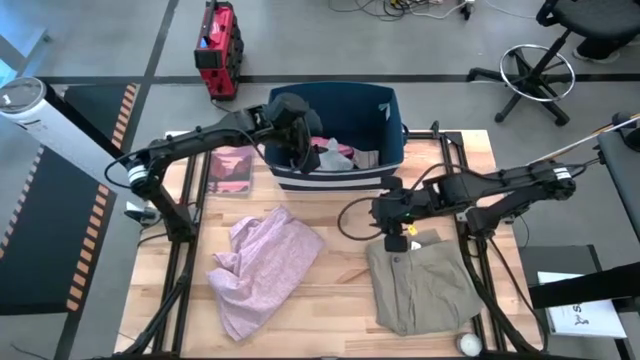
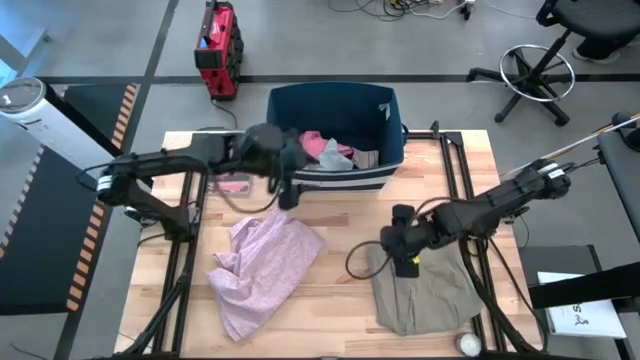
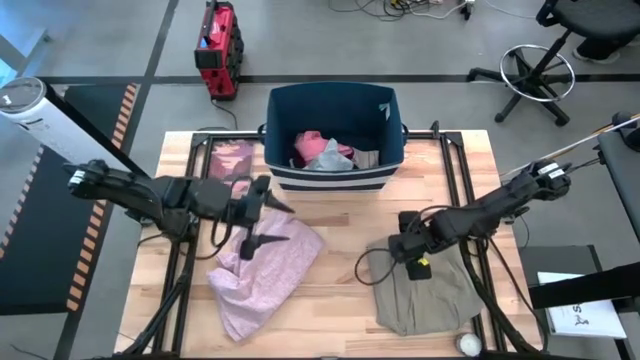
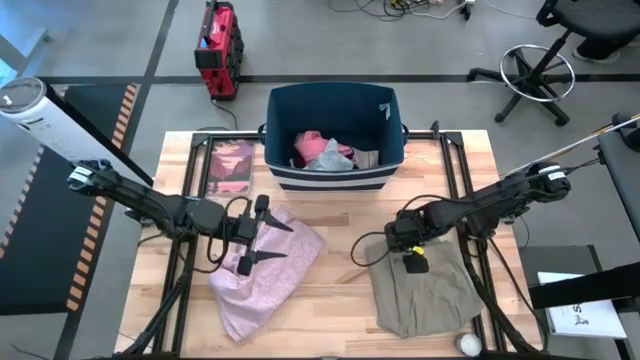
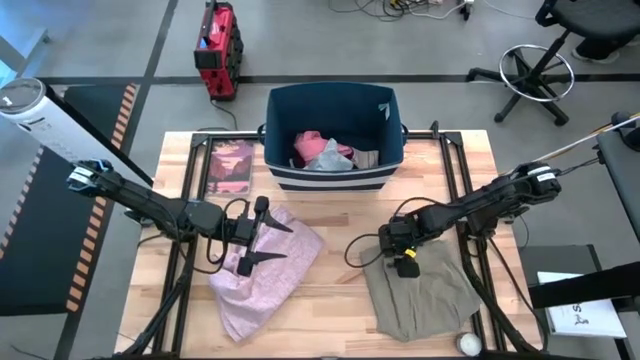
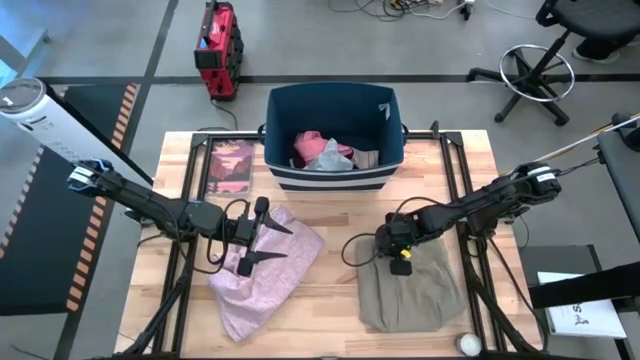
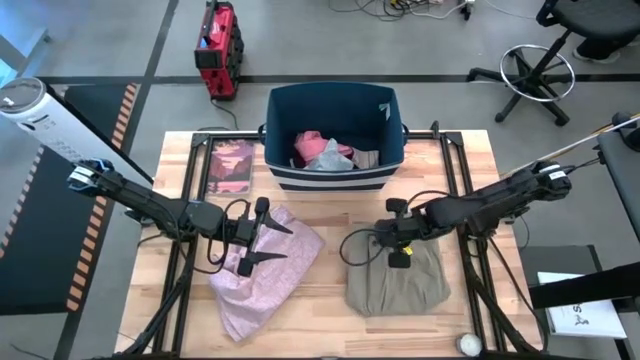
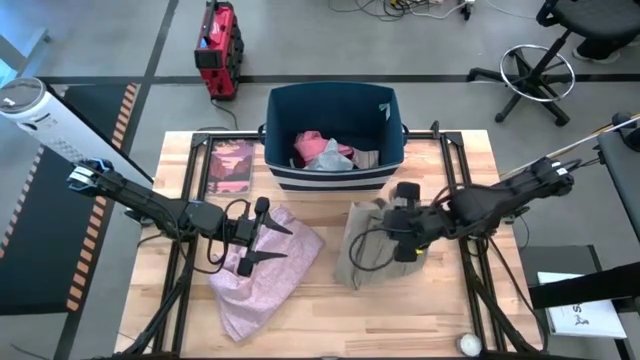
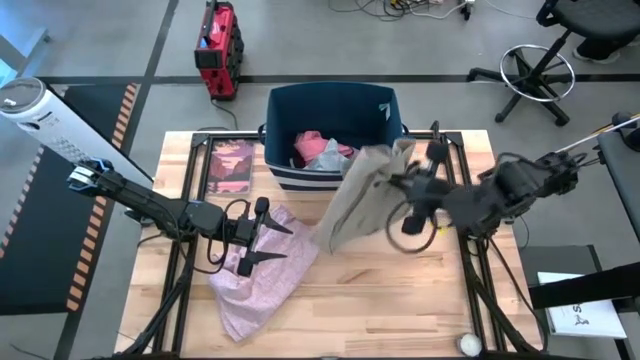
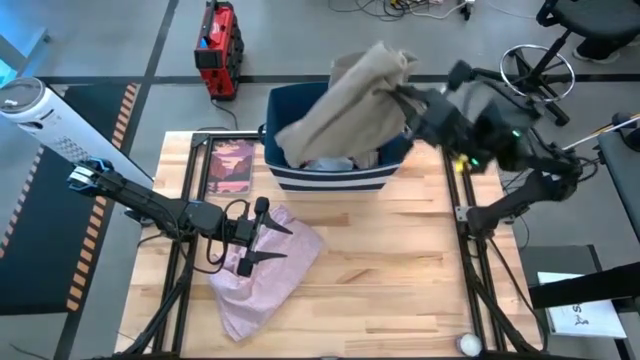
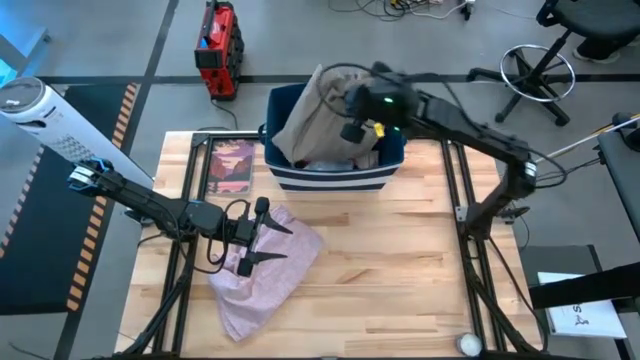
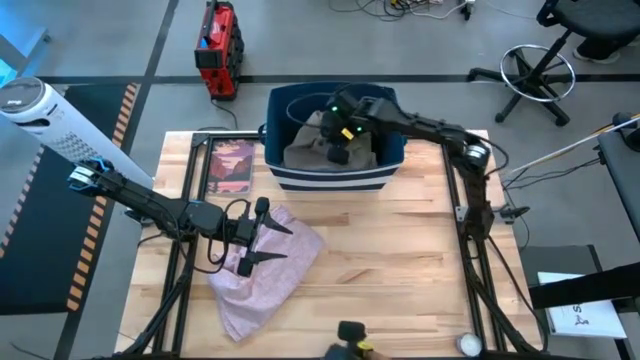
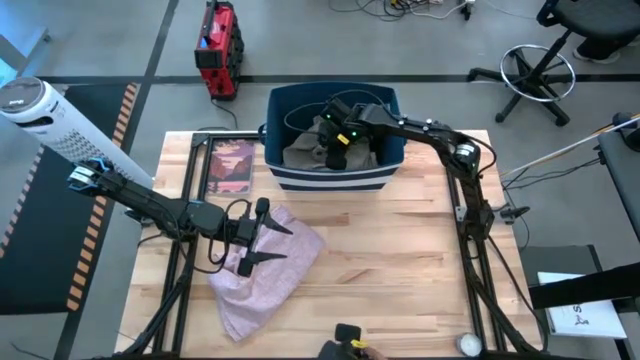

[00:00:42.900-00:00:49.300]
Task: Sort clothes
Put the brown short pants into the blue laundry bin

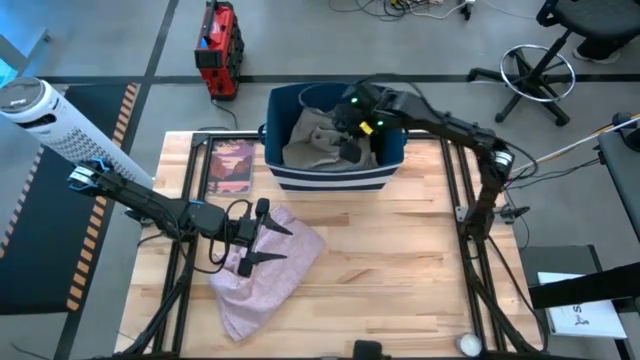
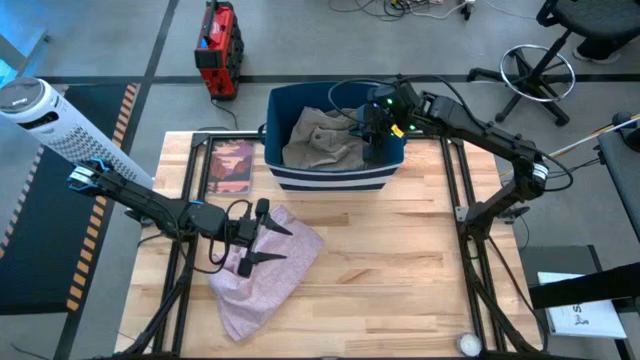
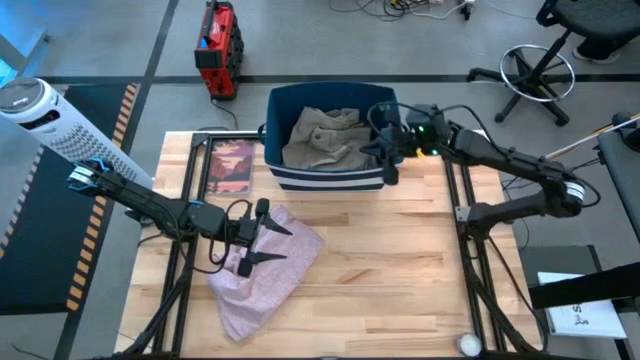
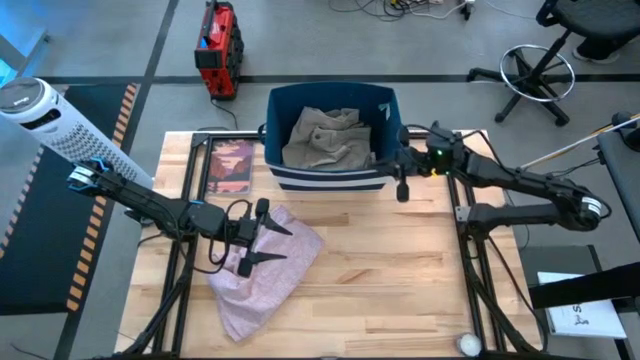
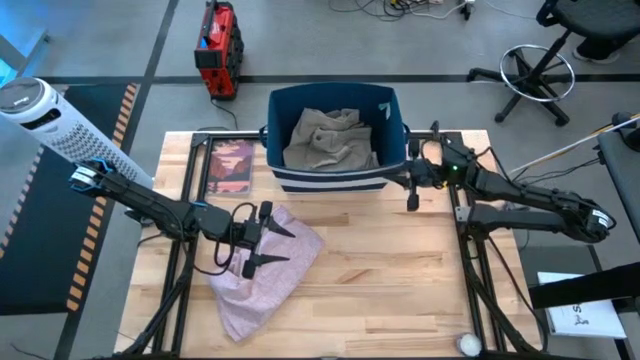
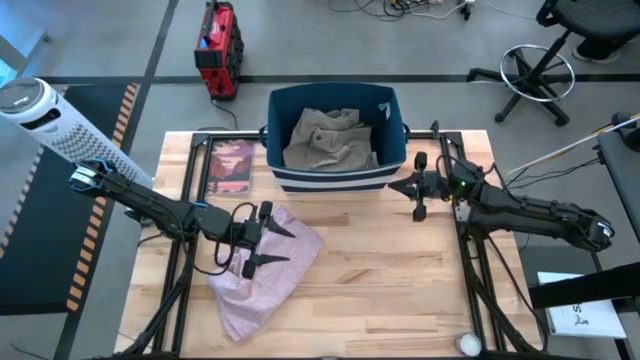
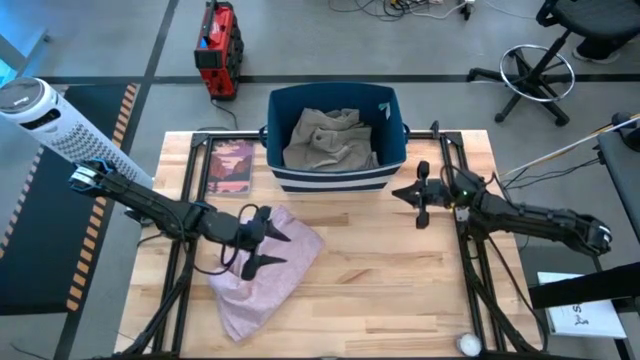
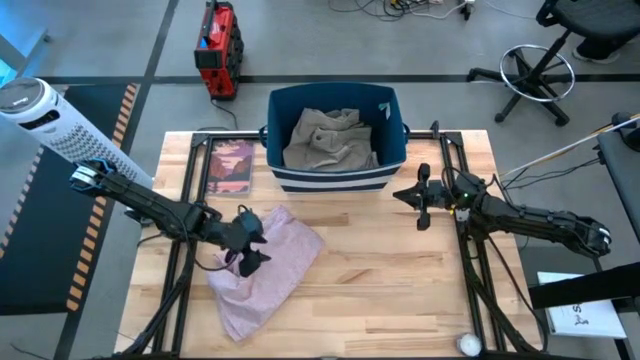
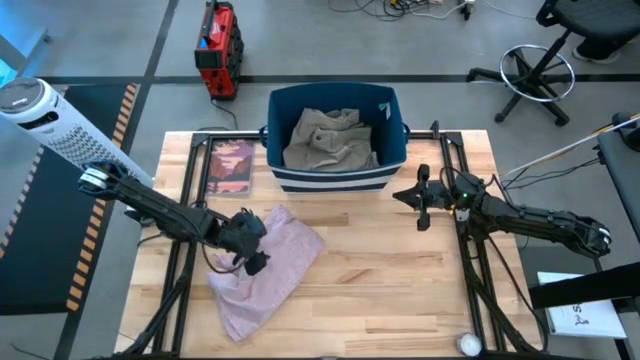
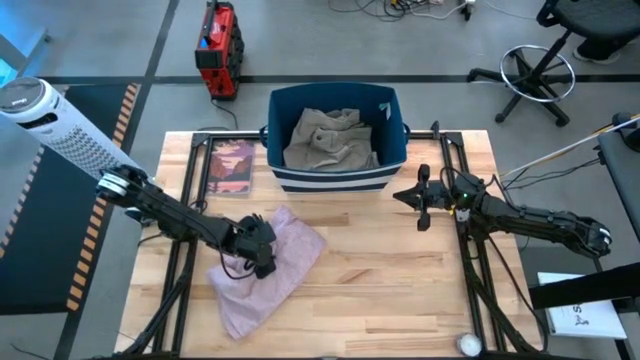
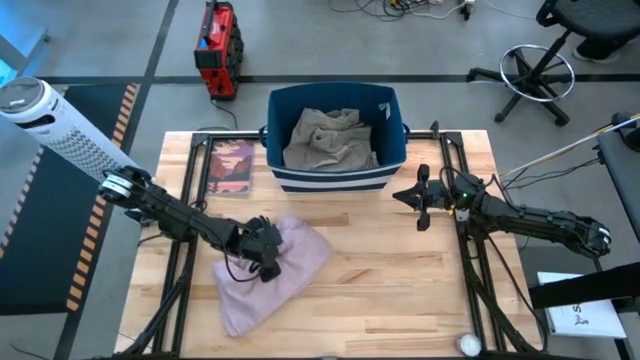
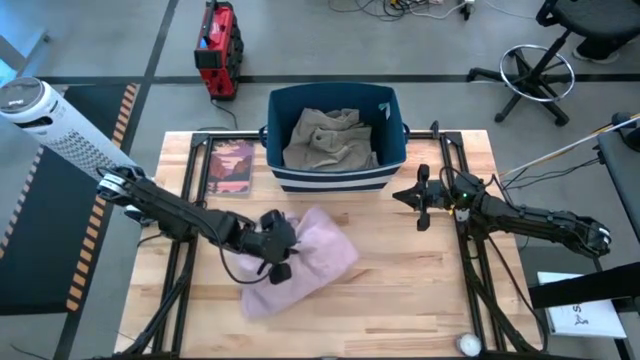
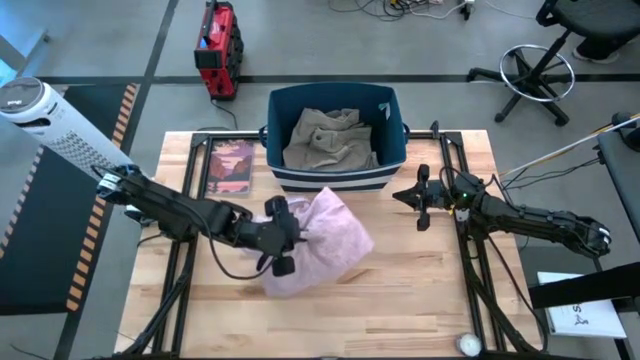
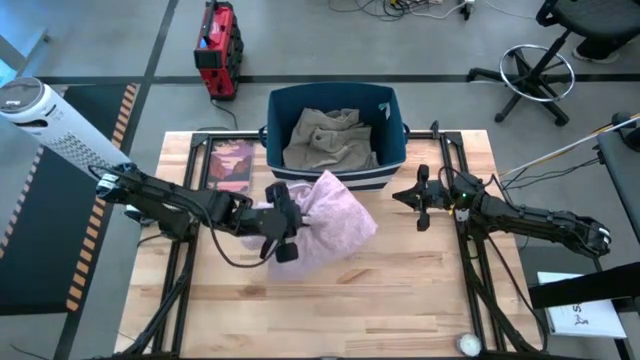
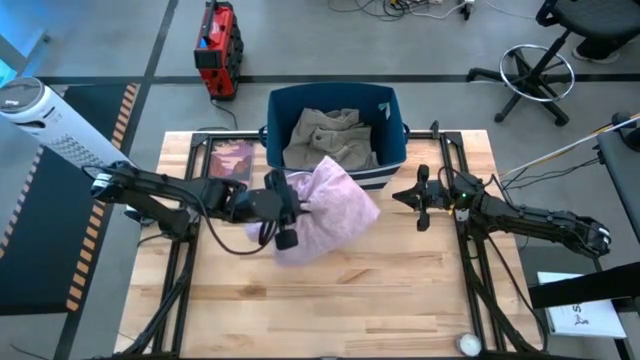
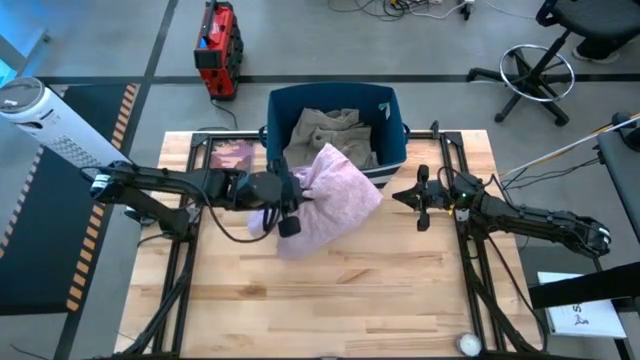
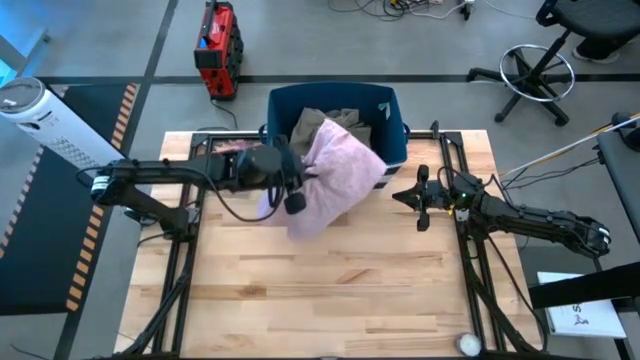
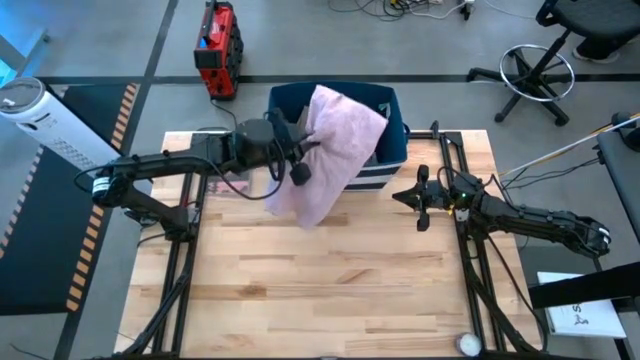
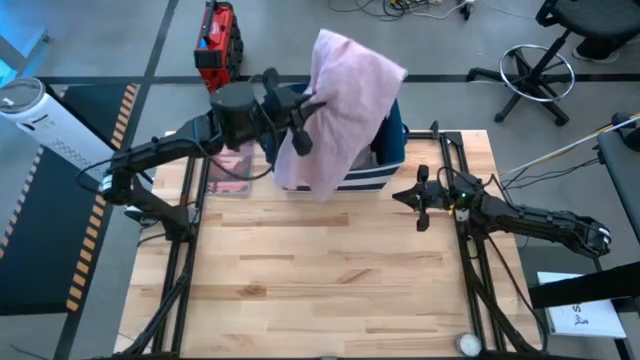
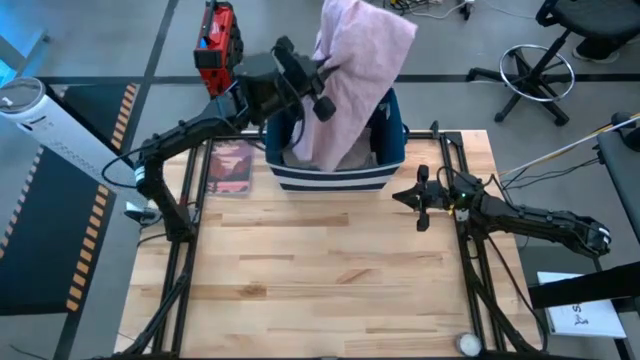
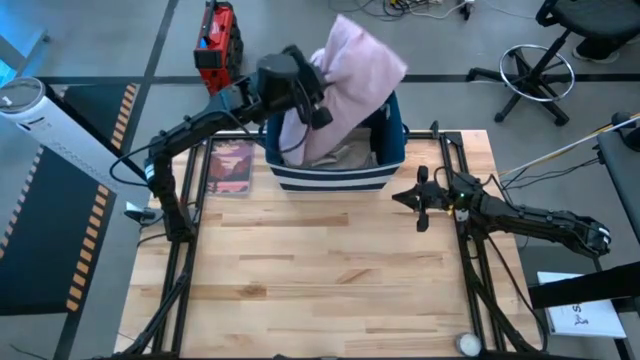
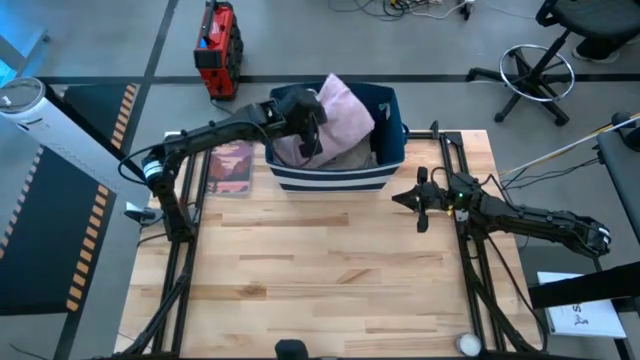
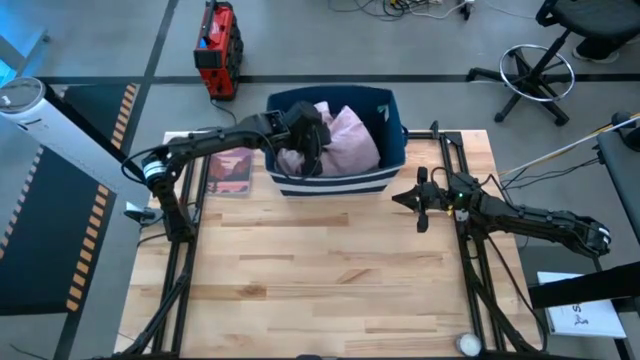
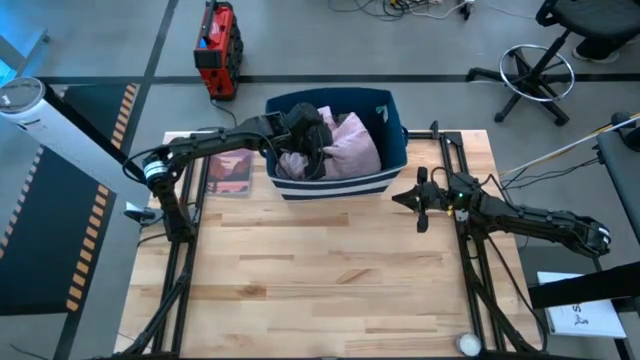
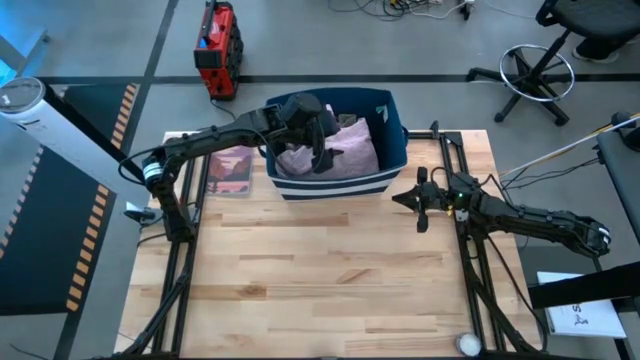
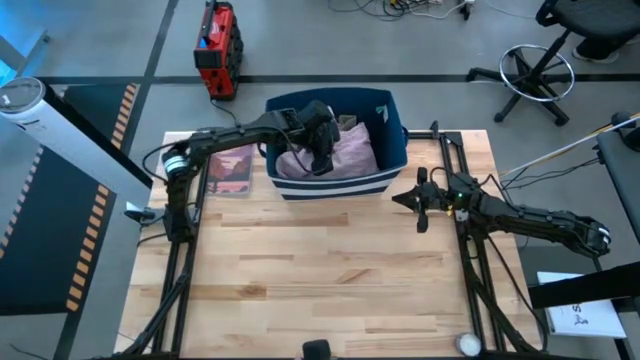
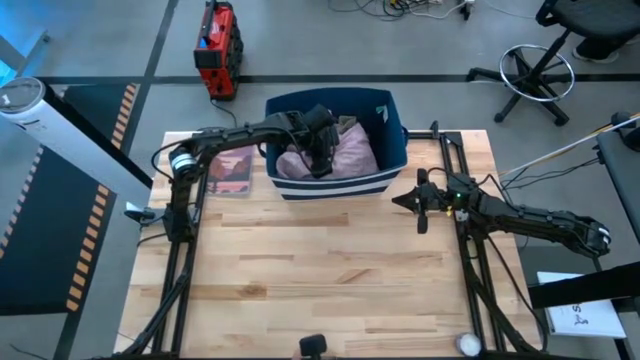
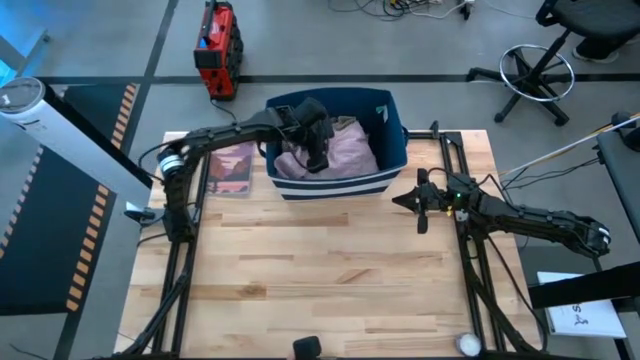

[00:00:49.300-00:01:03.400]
Put the pink long sleeve into the blue laundry bin

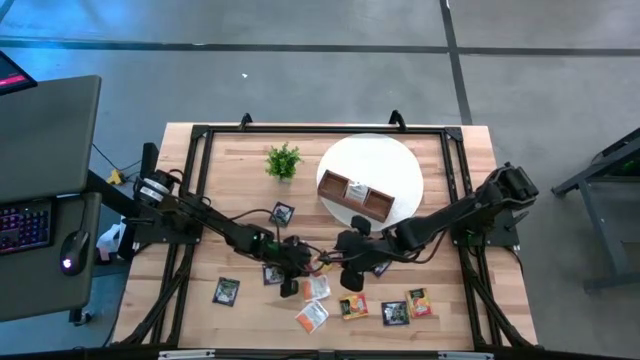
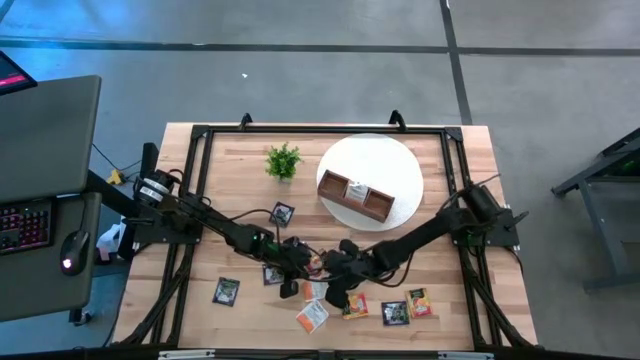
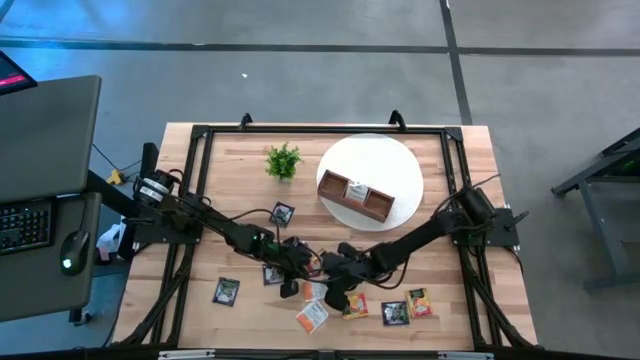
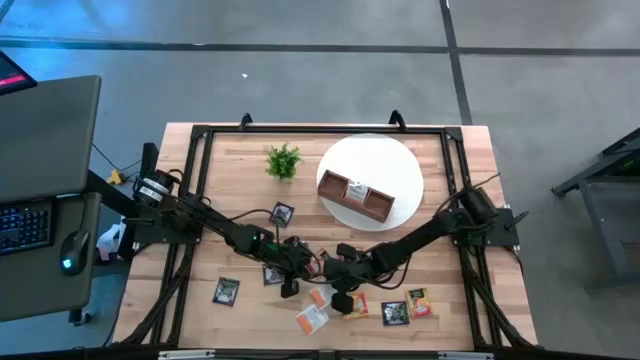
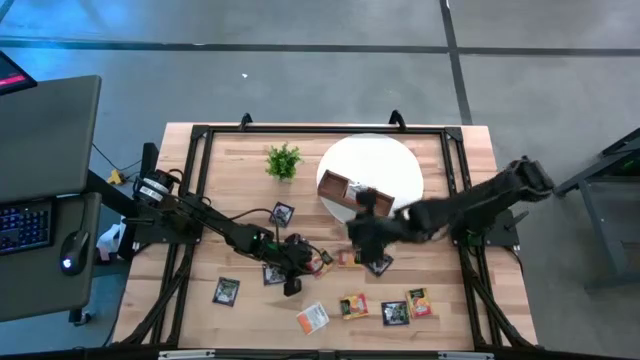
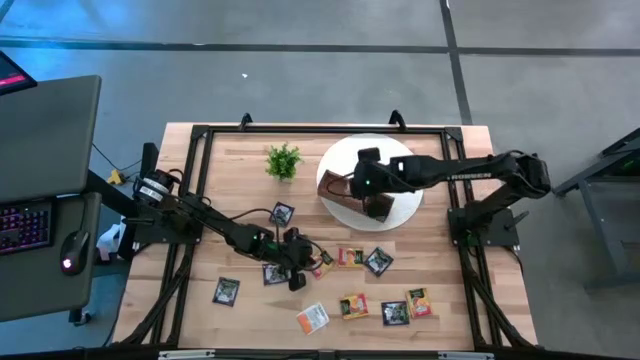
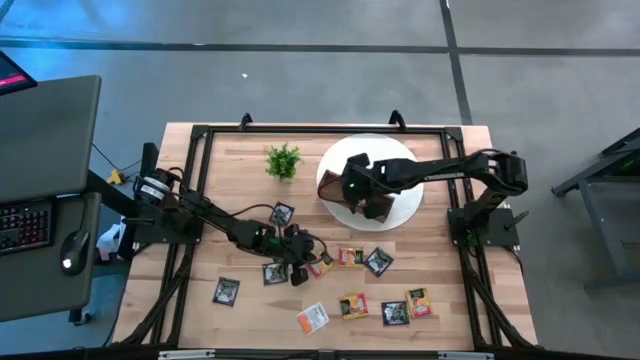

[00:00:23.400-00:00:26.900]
Task: Pick & Place Tea
Put the white tea bag into the middle compartment of the wooden organizer
